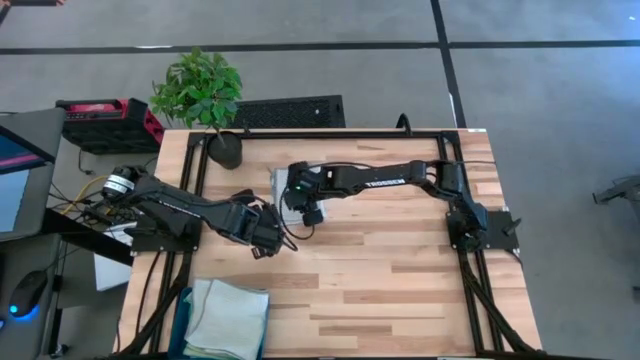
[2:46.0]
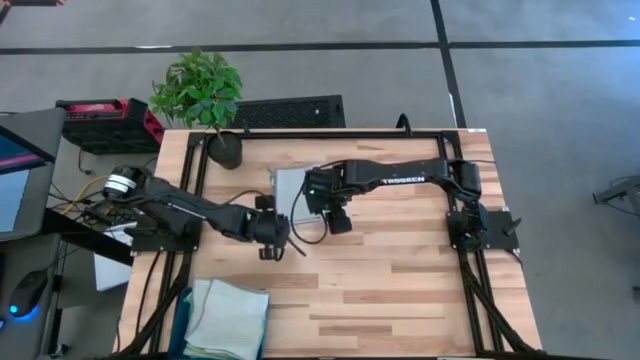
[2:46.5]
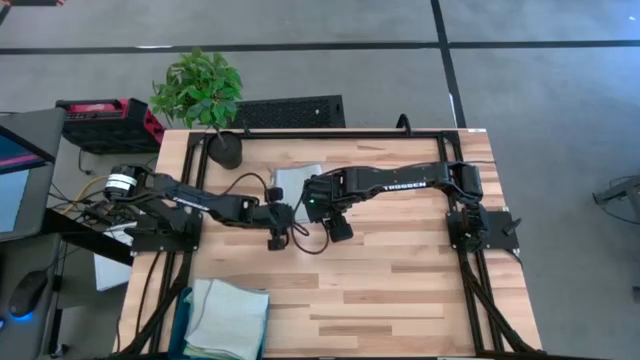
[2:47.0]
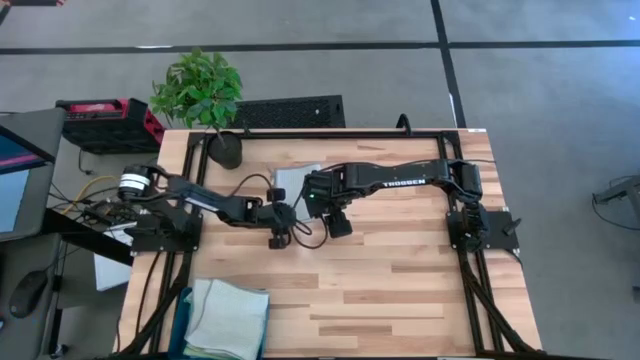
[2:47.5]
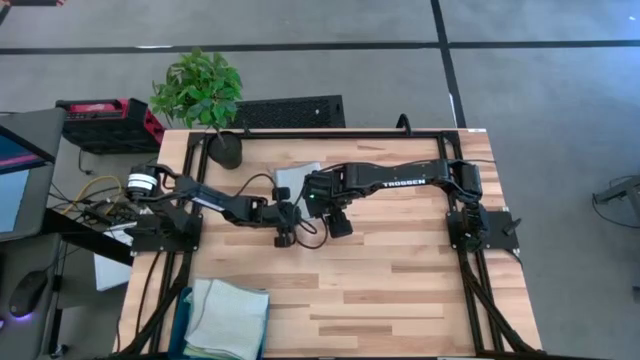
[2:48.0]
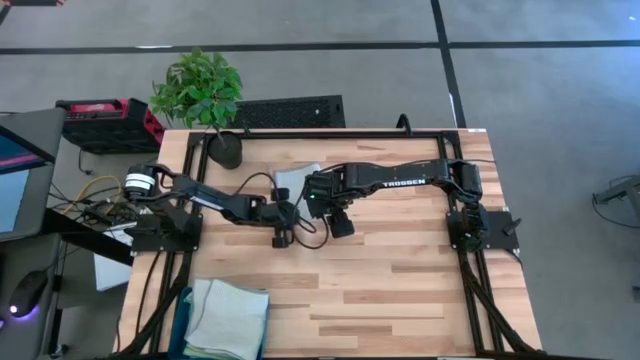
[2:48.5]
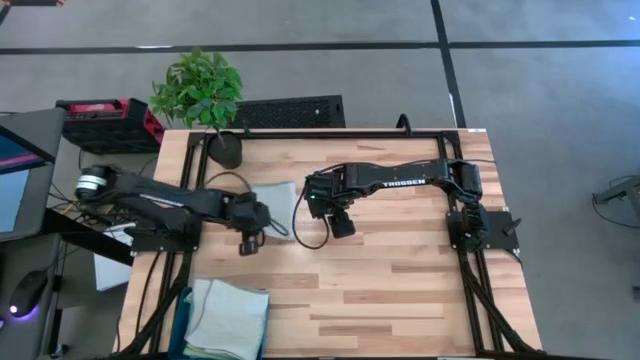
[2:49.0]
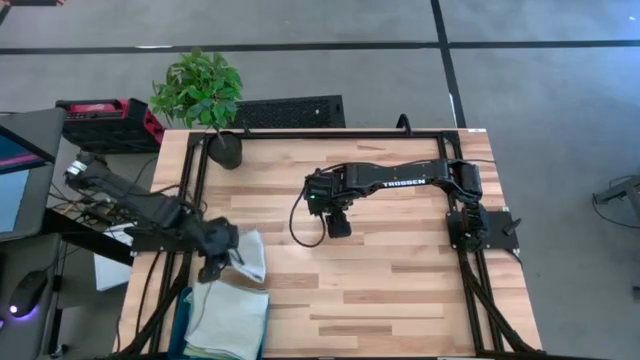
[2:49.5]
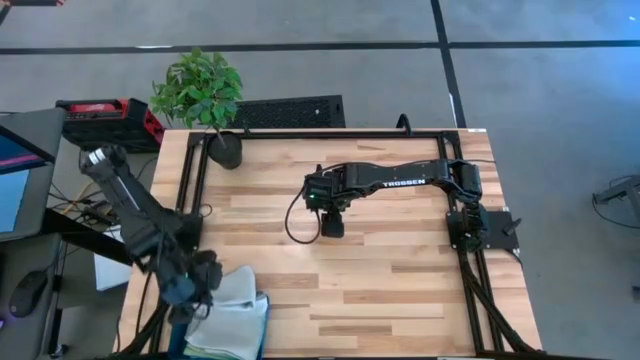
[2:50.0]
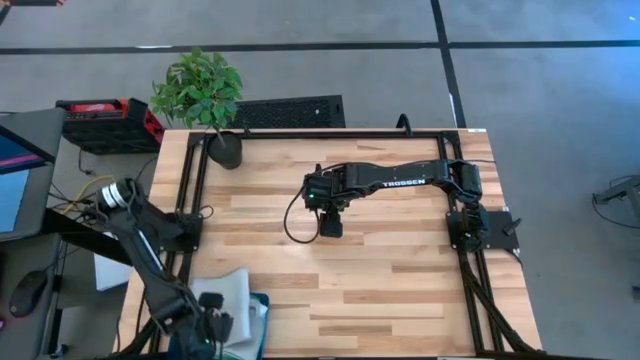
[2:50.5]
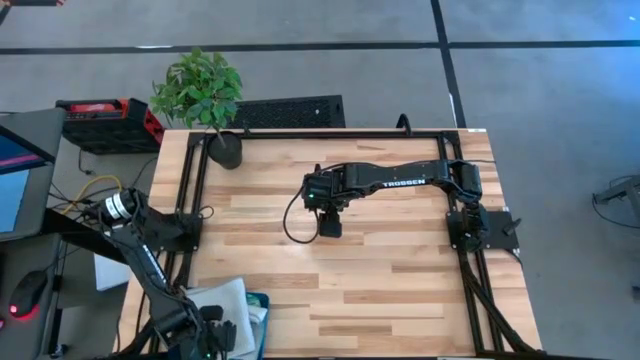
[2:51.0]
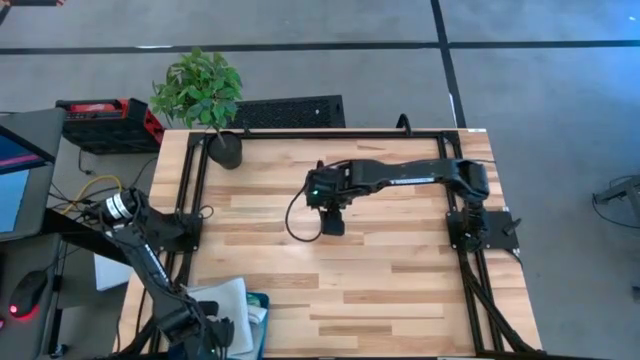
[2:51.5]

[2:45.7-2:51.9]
Task: Fold microfiber towels
Stack the grey microfiber cloth on top of the grey microfiber cloth into the bin

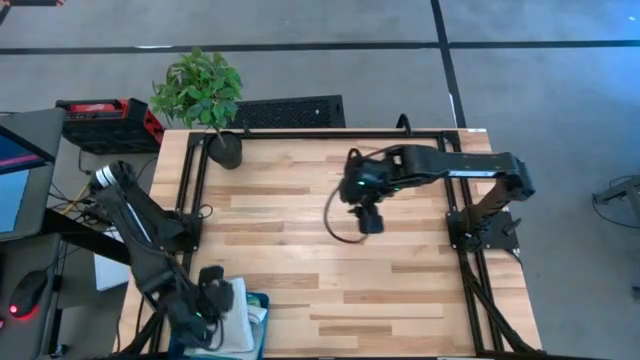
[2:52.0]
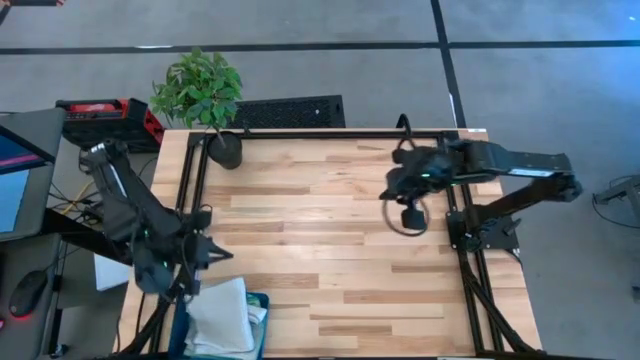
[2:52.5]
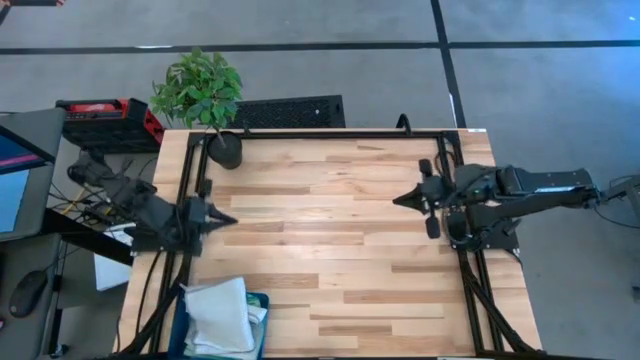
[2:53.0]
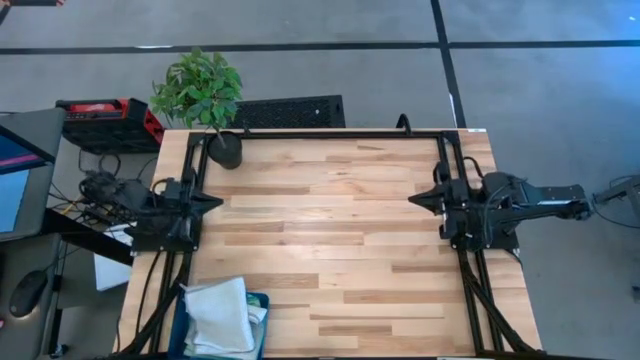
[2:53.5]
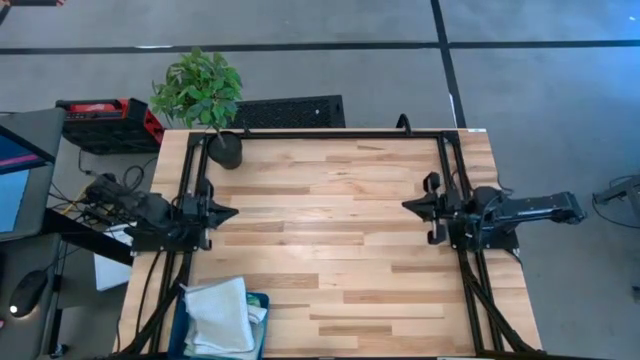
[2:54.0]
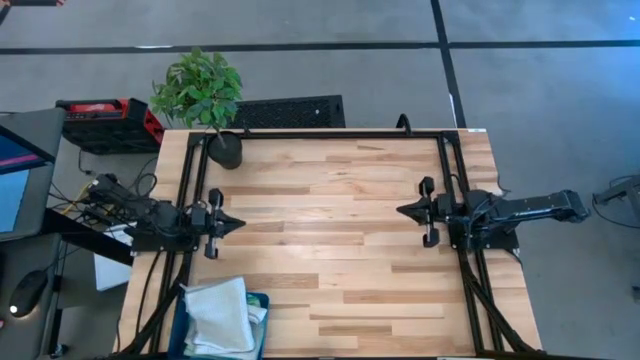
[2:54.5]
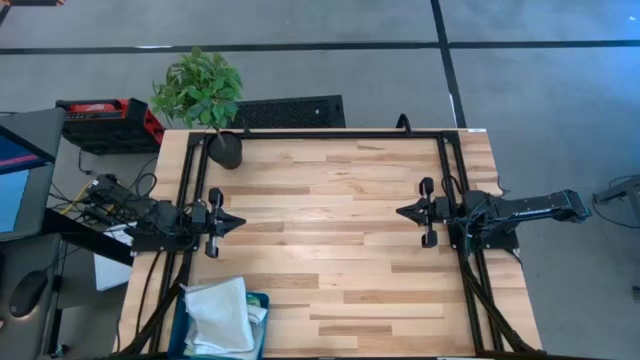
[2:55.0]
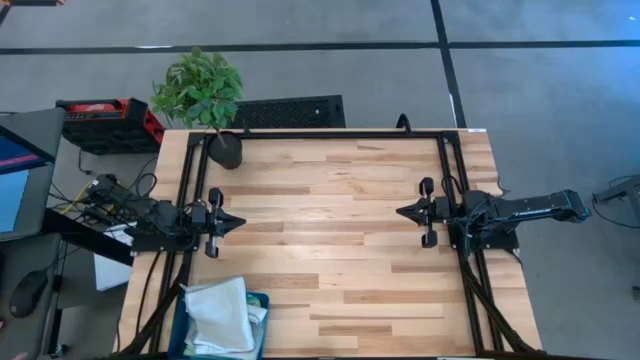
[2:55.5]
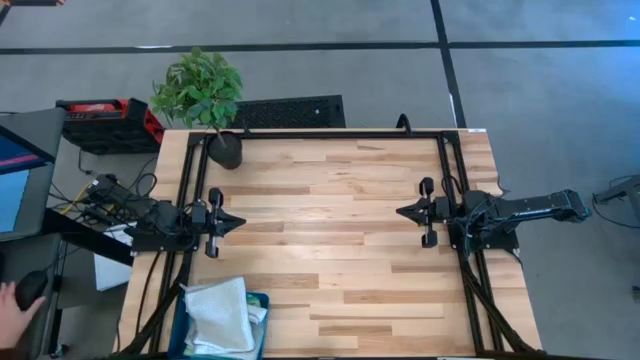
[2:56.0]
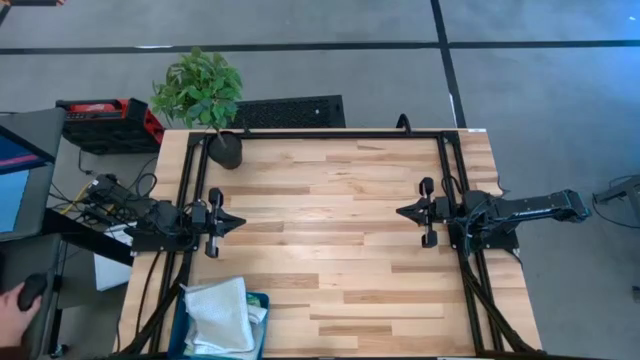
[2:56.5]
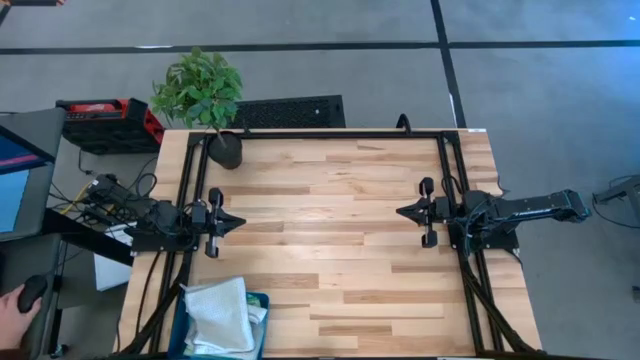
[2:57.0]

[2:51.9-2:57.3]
Return to Home Position

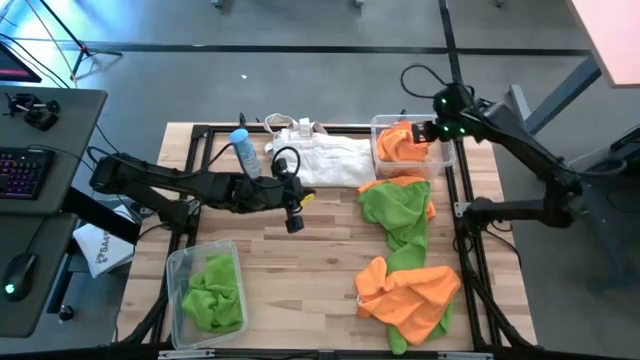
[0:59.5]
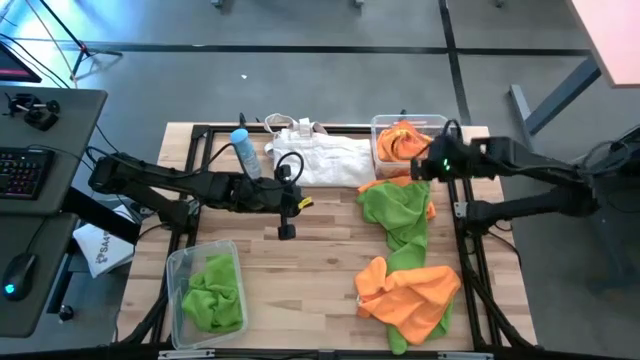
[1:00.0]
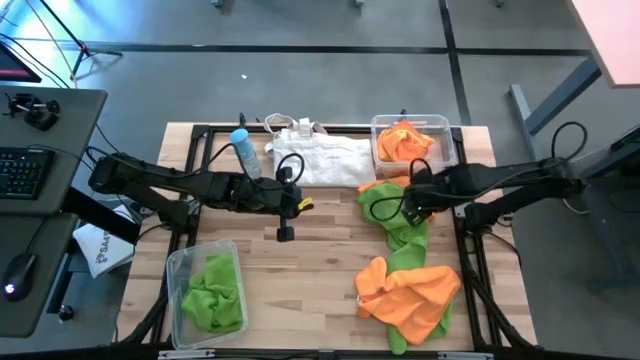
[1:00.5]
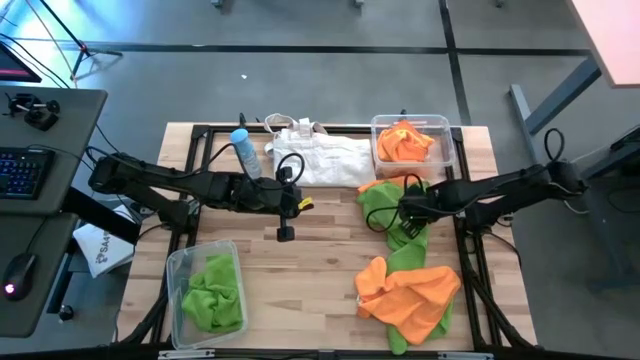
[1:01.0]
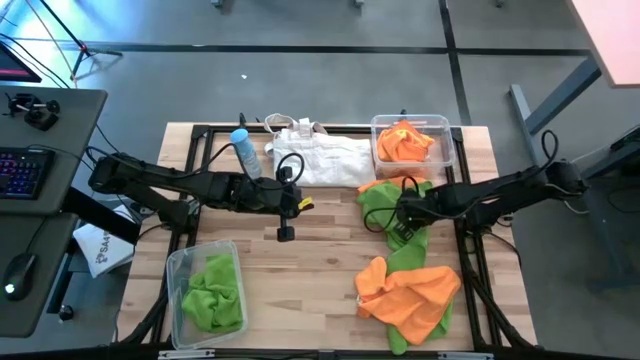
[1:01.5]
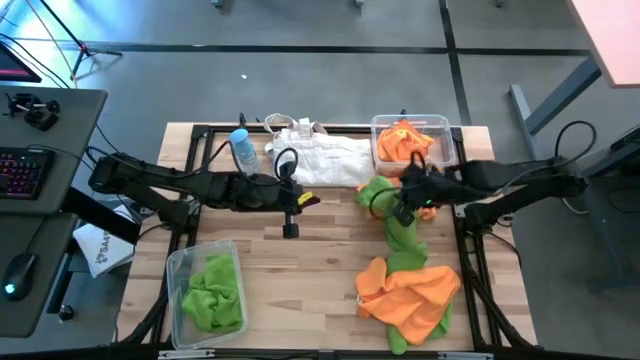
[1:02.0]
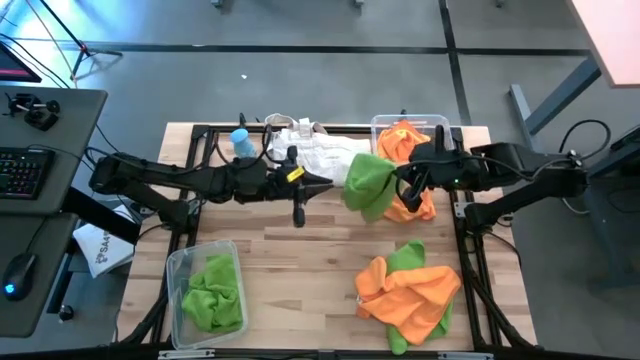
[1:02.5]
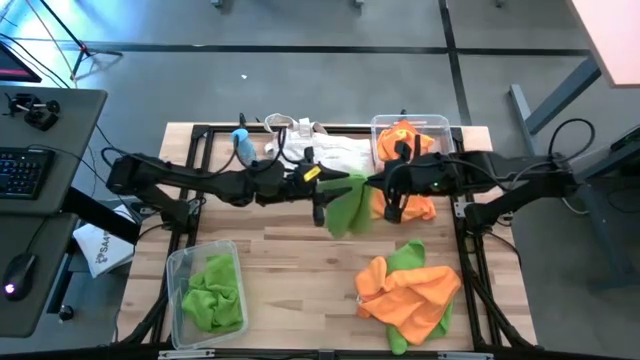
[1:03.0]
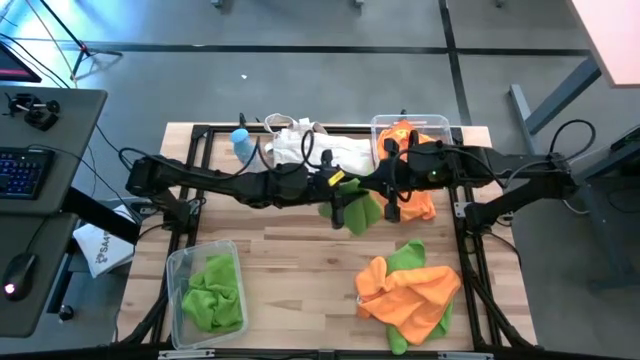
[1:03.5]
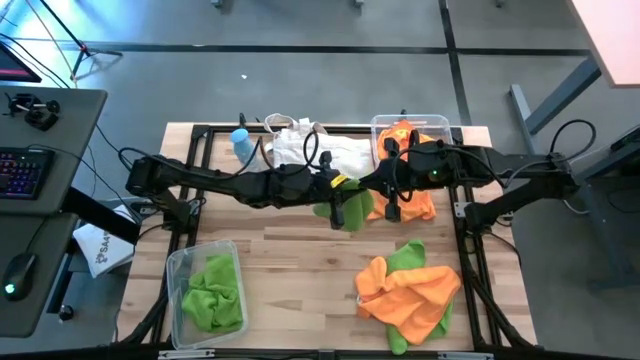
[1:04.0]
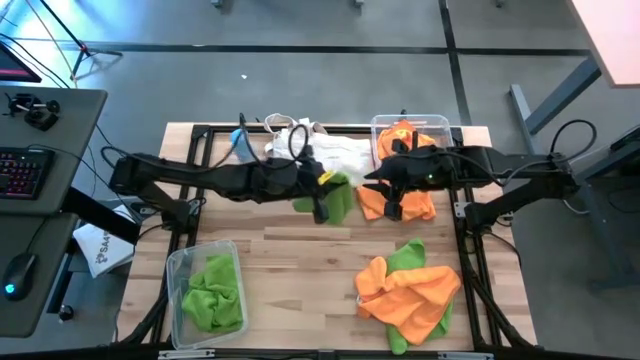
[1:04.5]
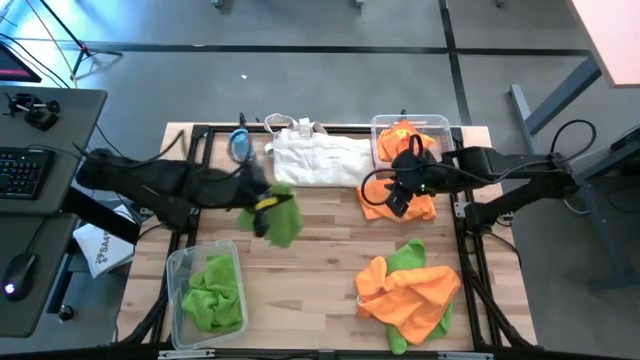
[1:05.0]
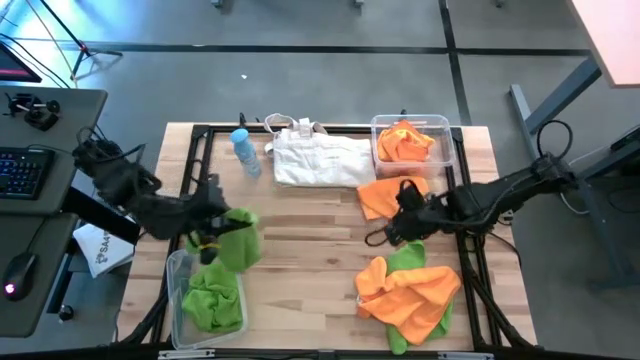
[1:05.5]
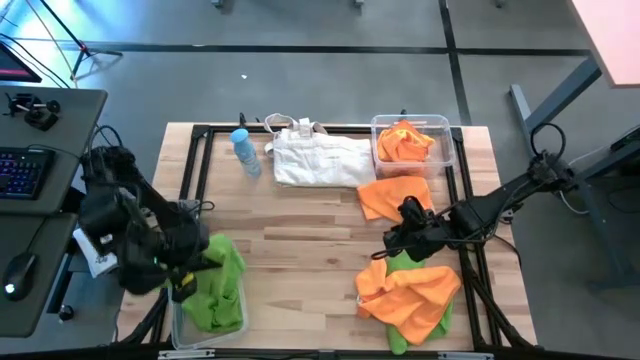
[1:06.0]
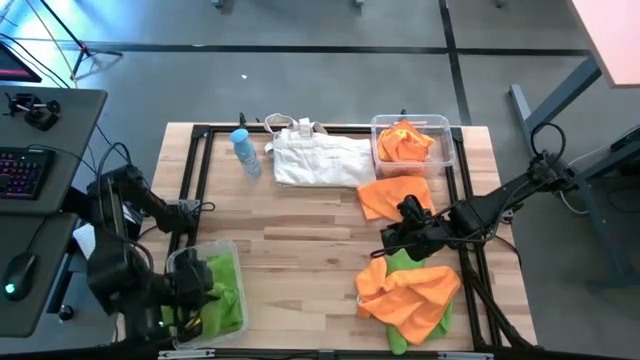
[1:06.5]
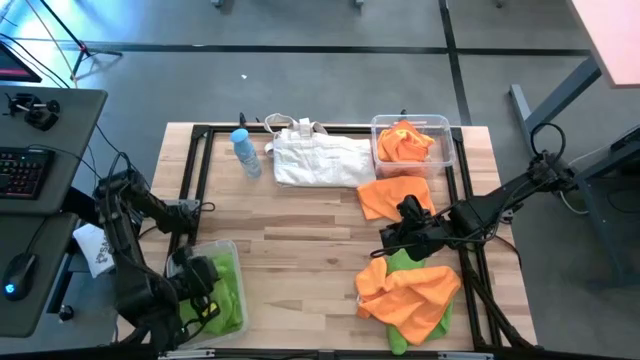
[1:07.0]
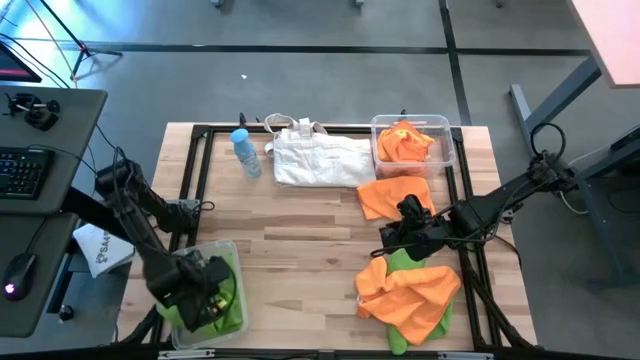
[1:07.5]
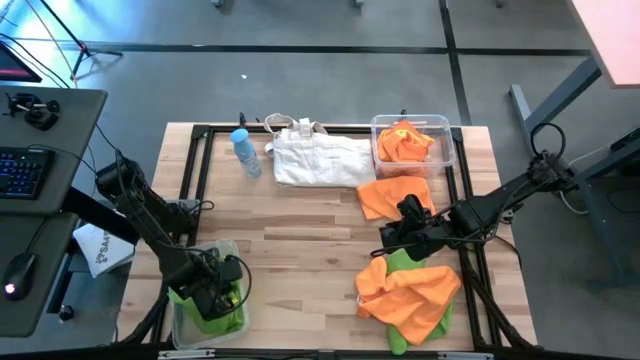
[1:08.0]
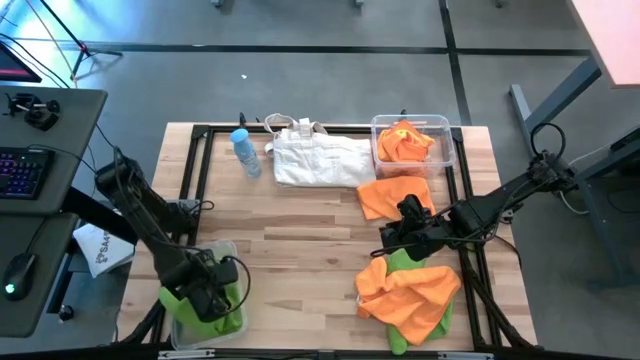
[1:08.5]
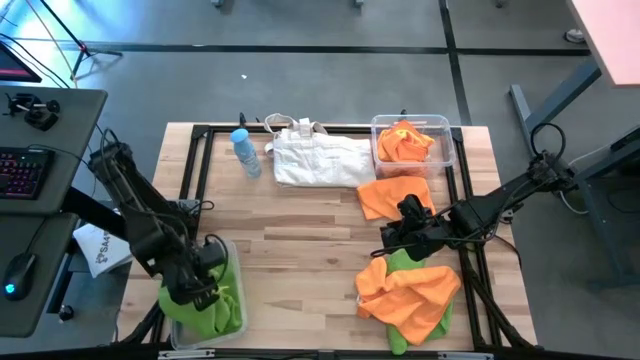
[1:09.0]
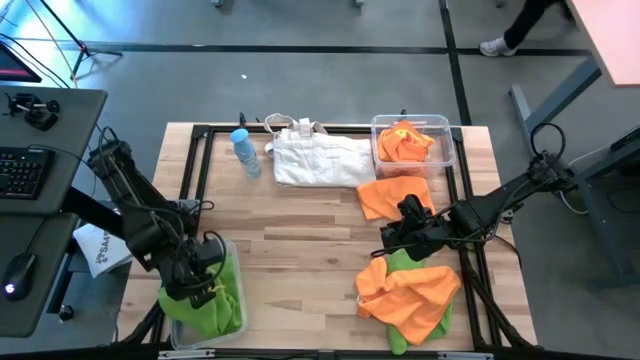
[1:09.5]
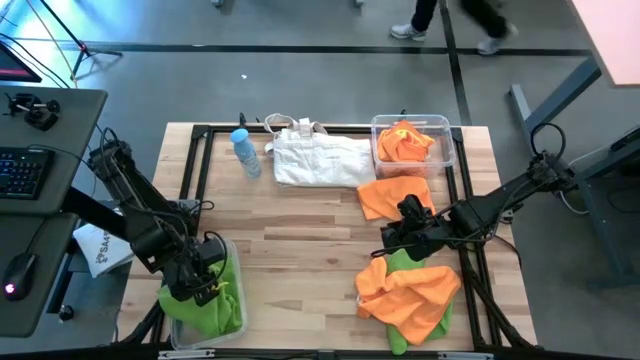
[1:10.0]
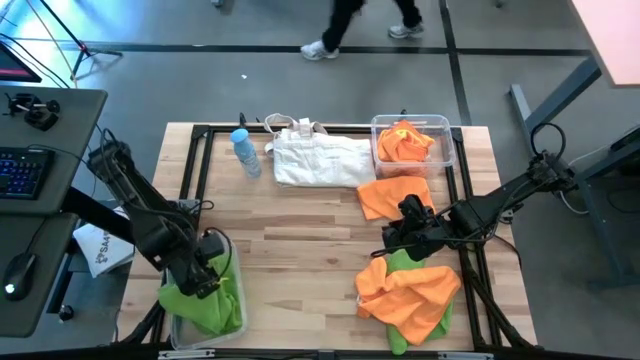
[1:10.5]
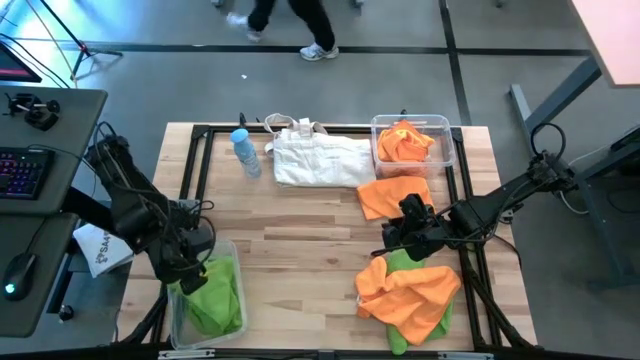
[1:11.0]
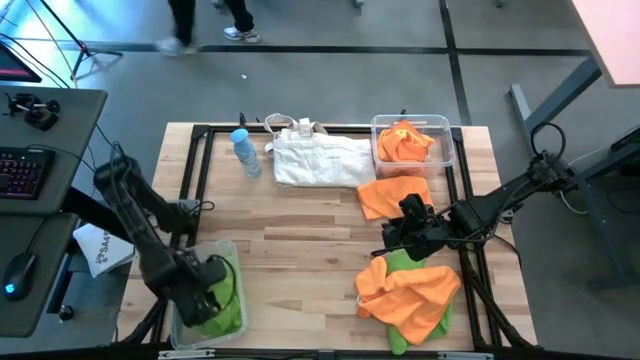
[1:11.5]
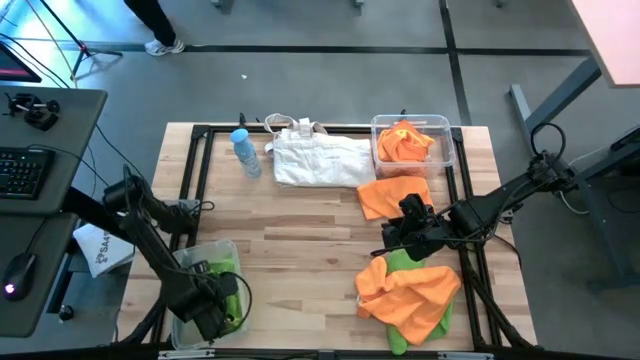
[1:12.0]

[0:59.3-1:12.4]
Task: Sort microfiber towel by color & place in baskets
Put the green microfiber cloth into the bottom transparent bin
